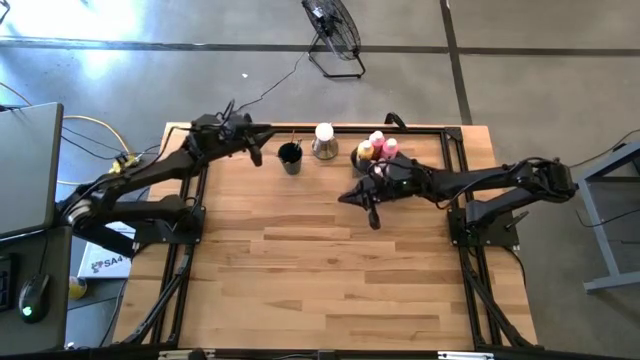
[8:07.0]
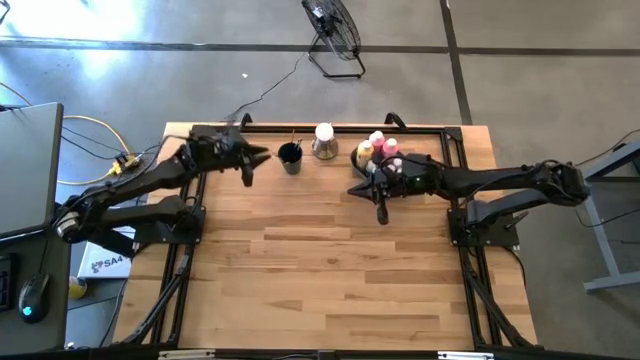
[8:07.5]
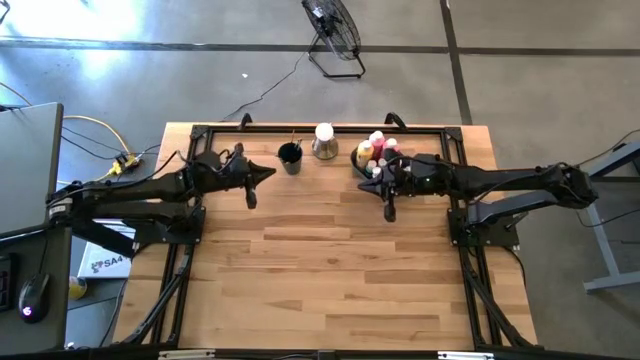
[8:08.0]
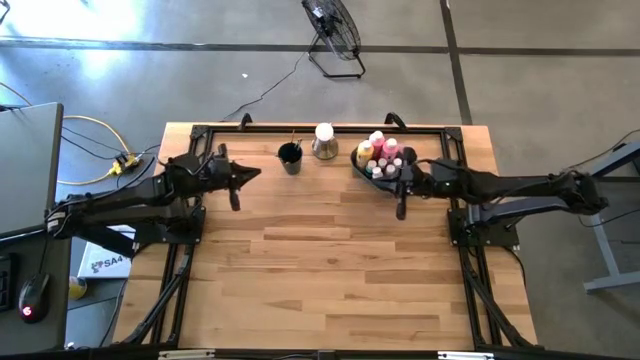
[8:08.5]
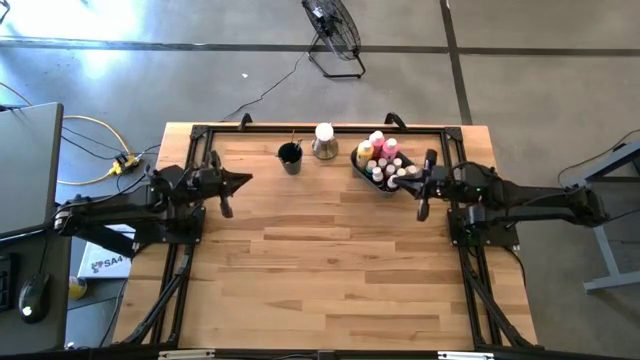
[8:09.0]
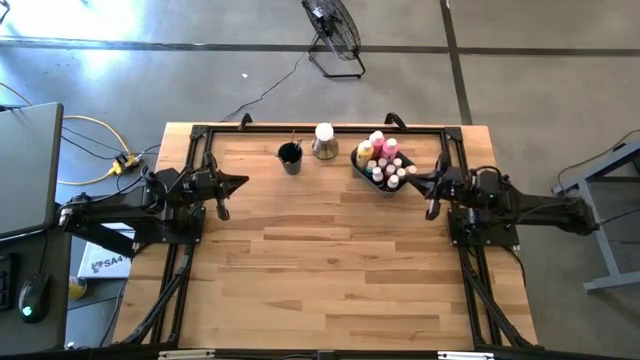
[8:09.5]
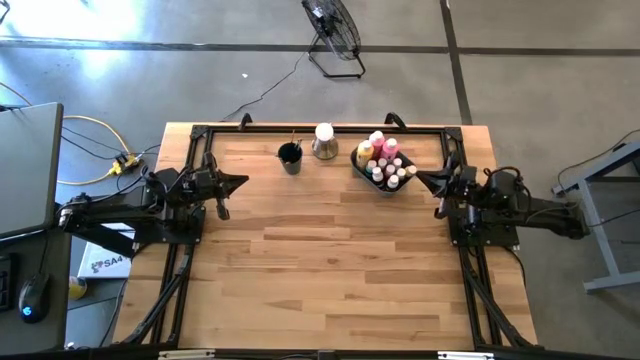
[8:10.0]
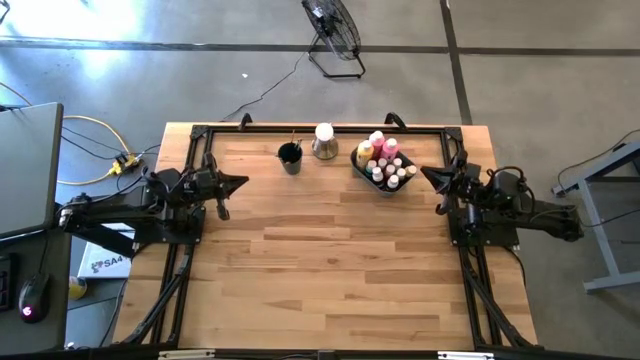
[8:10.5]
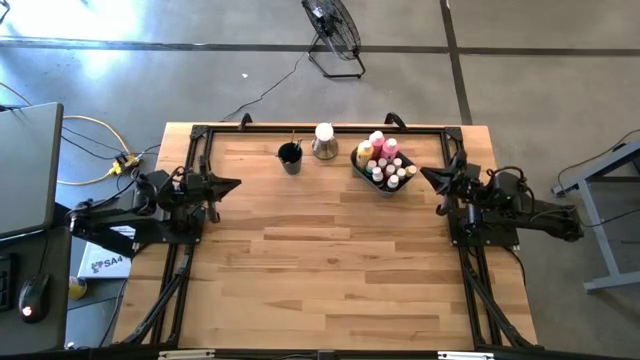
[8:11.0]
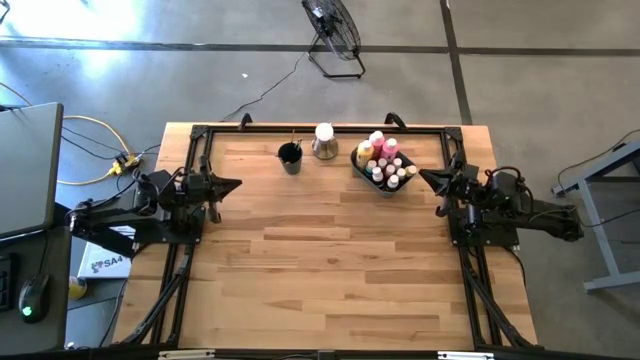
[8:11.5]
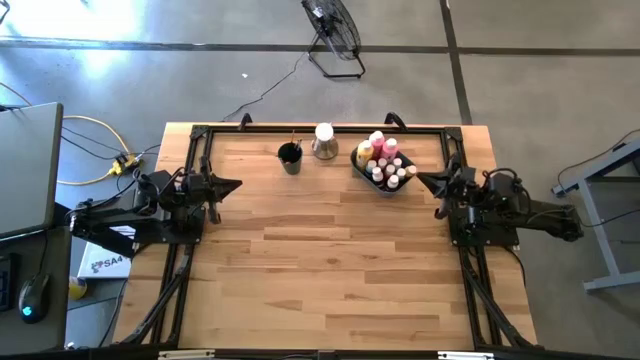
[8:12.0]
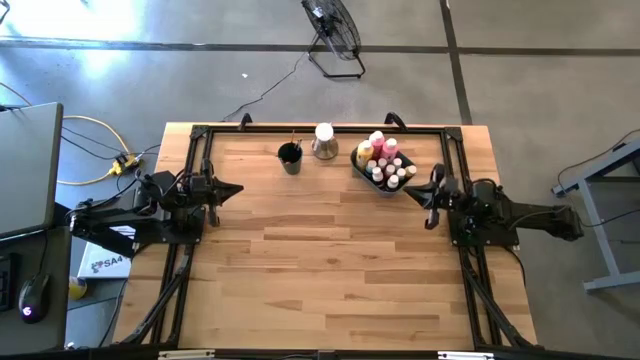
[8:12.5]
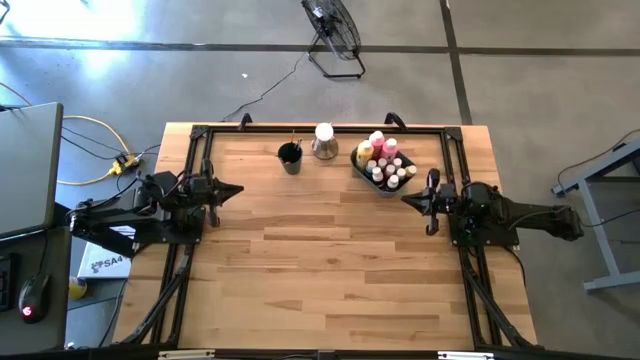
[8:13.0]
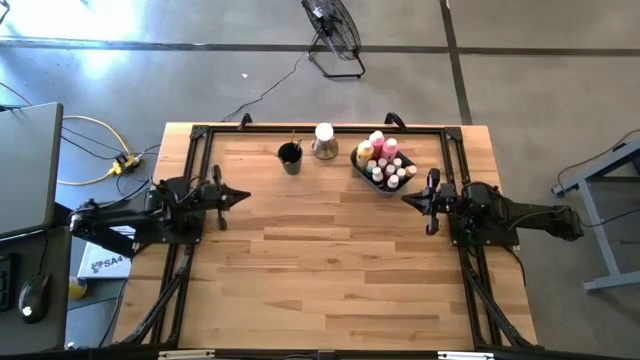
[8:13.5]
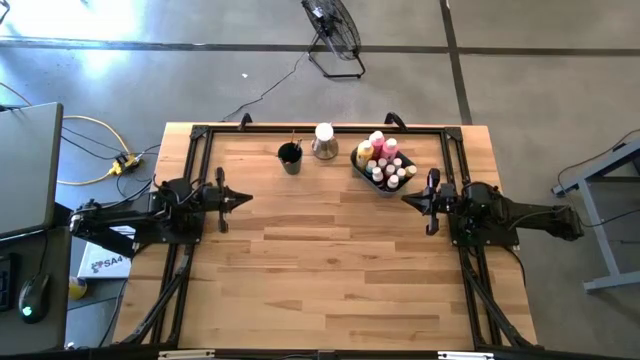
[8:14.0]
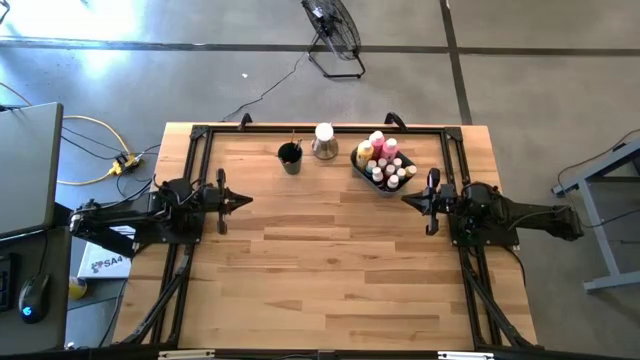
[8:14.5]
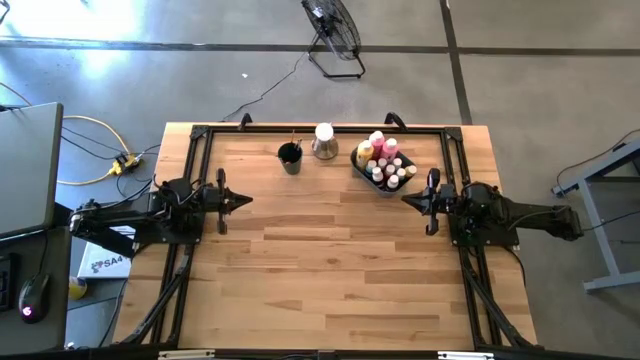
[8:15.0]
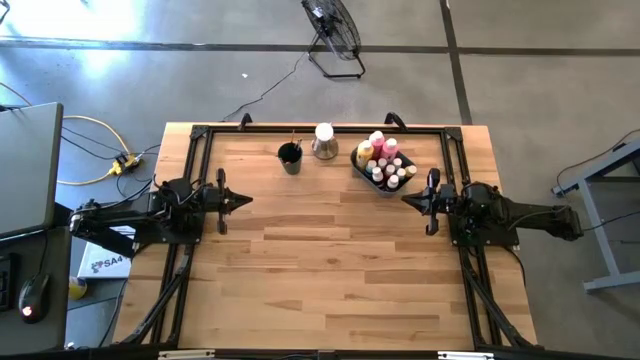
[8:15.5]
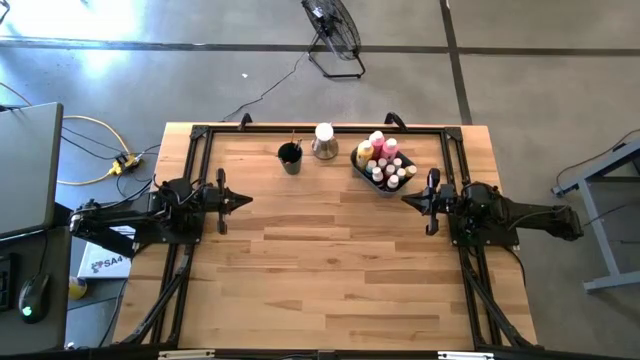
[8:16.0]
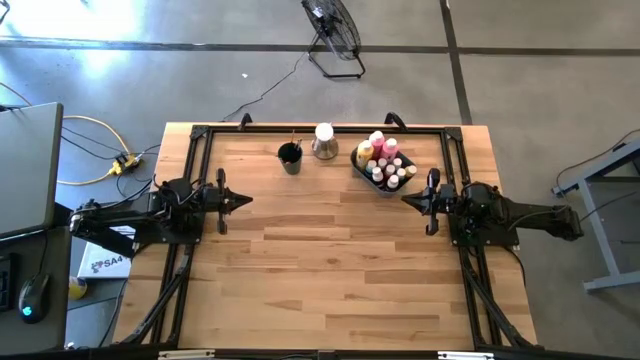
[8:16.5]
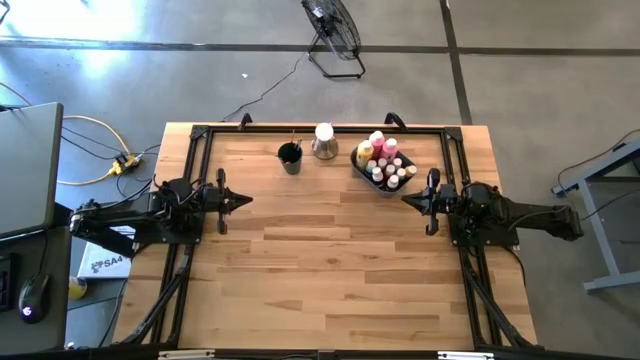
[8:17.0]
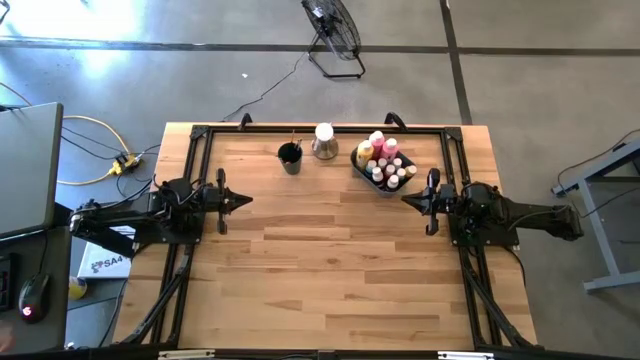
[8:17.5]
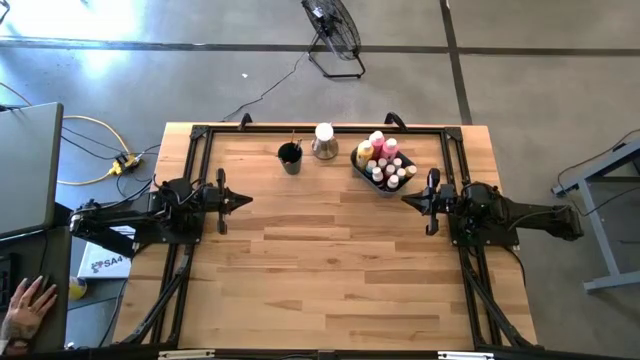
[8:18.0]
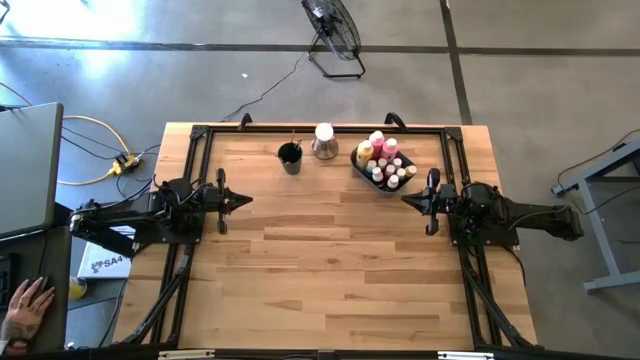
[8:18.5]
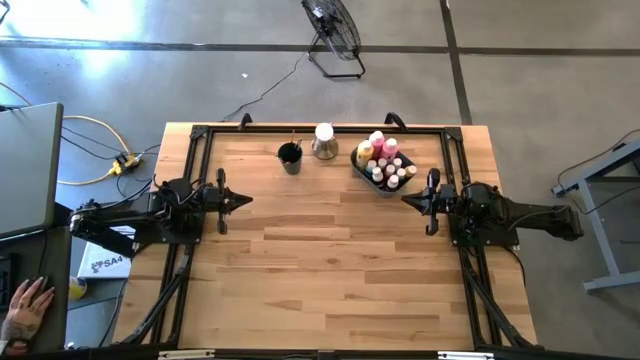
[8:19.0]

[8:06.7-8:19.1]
Task: Pick & Place Paint Supplies
Return to Home Position
